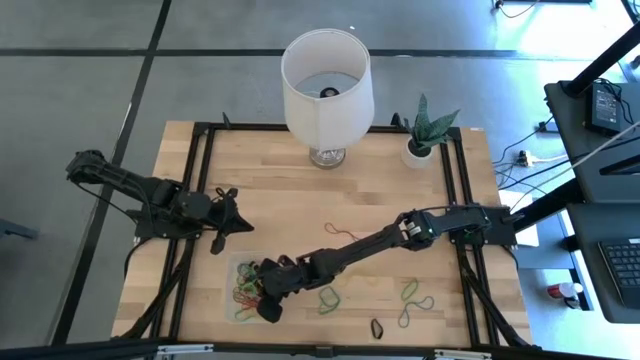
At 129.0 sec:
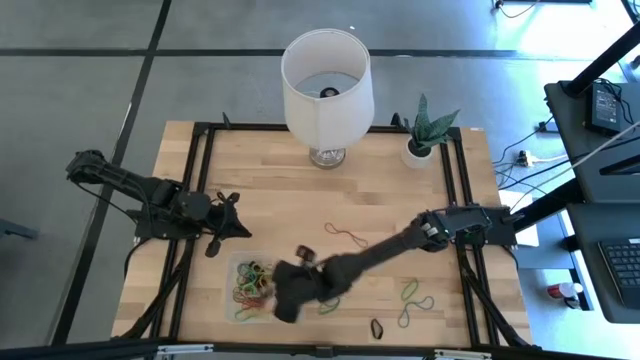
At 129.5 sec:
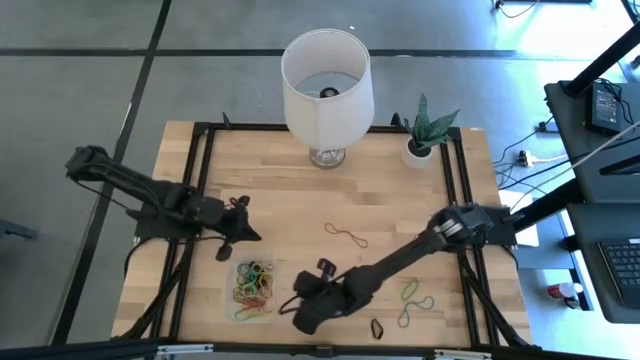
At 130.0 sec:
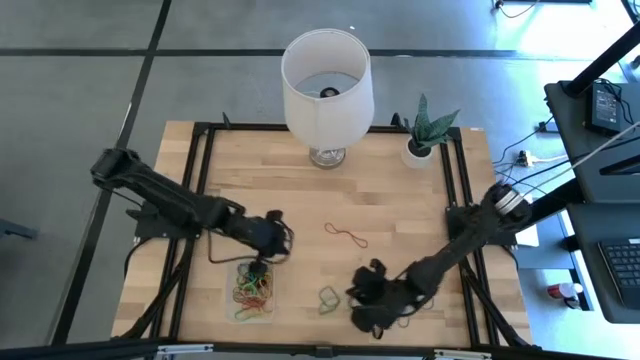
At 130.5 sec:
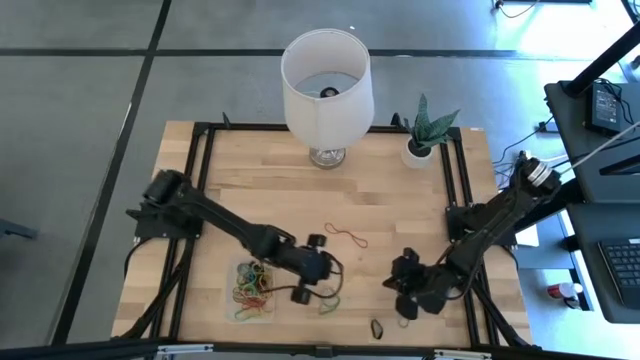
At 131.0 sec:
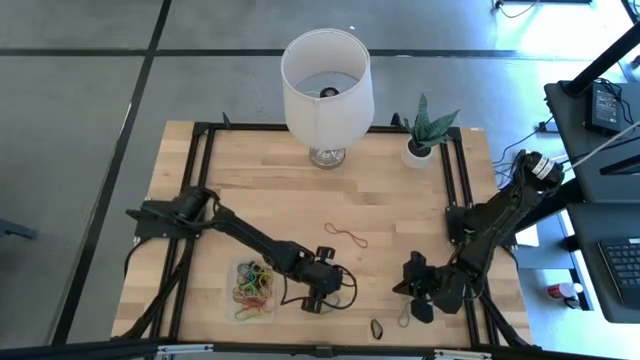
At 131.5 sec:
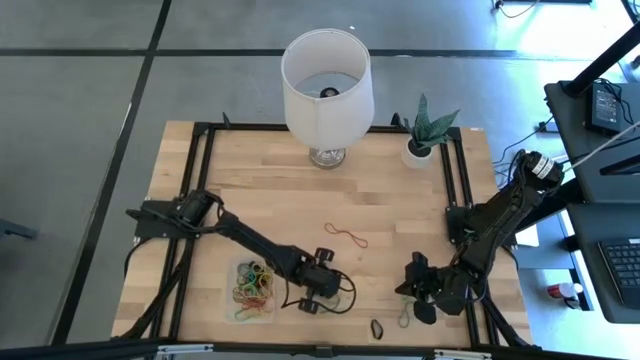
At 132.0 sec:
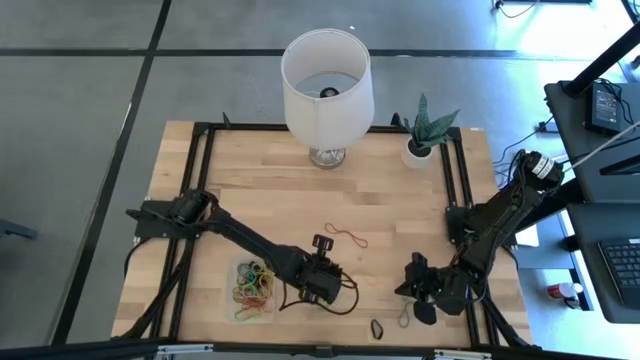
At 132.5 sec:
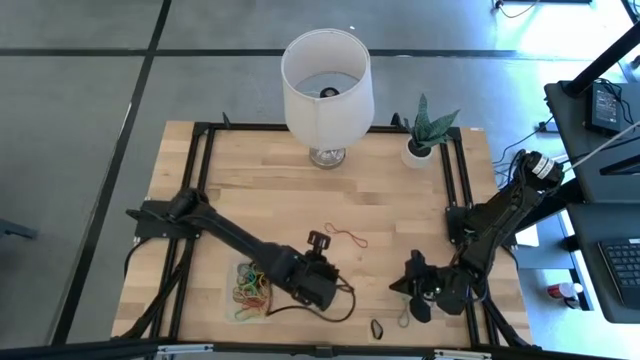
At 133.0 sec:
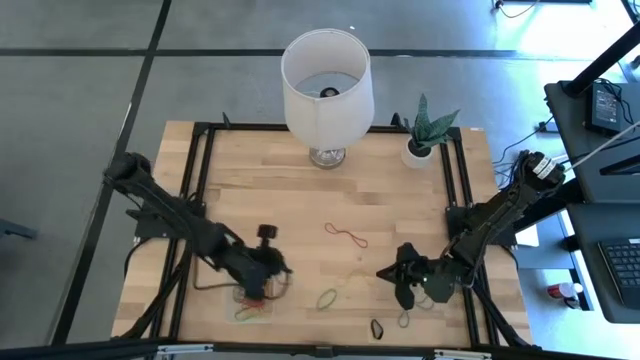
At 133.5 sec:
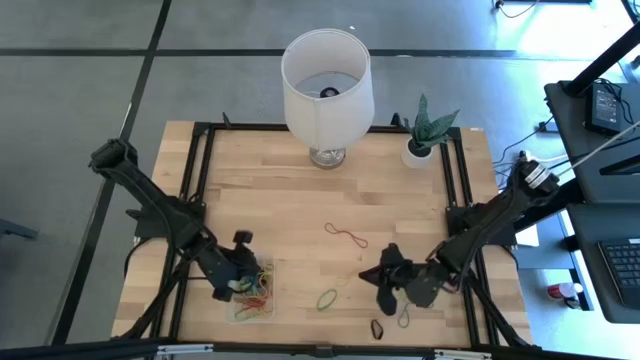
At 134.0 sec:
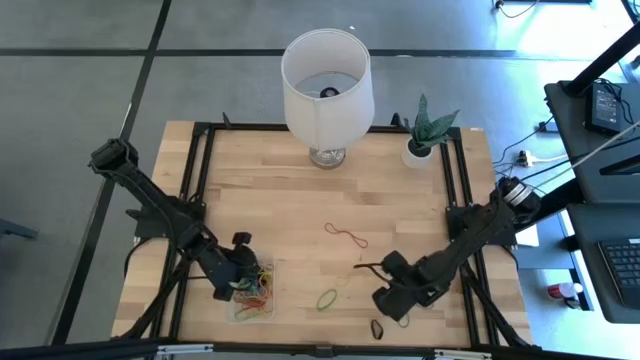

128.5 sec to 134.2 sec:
Task: Pick and place rubber bands into bin
Put the blue rubber band into the transparent bin

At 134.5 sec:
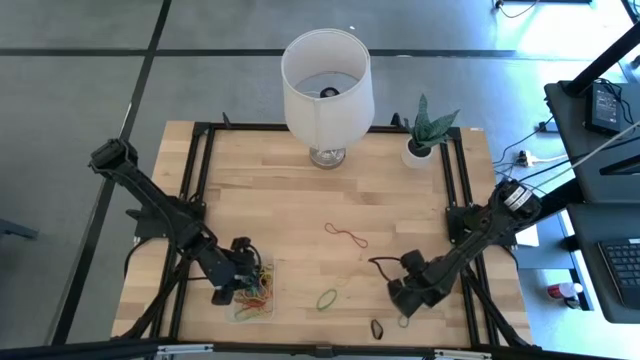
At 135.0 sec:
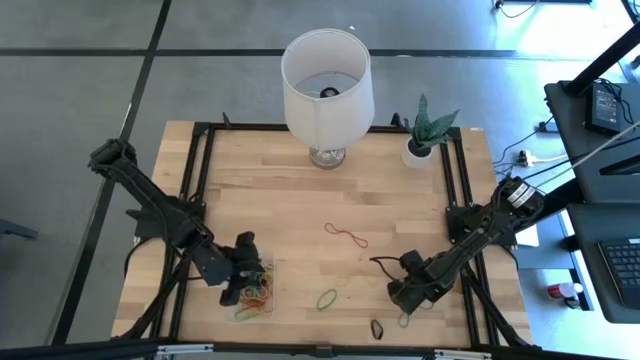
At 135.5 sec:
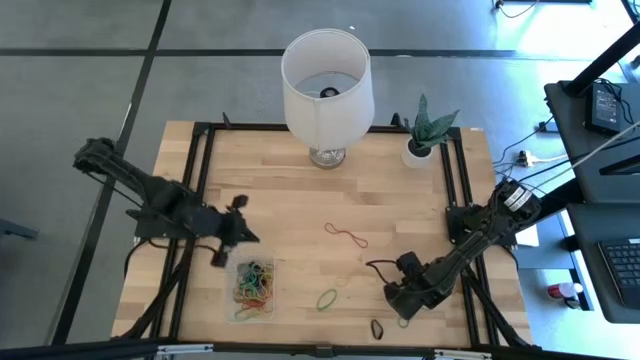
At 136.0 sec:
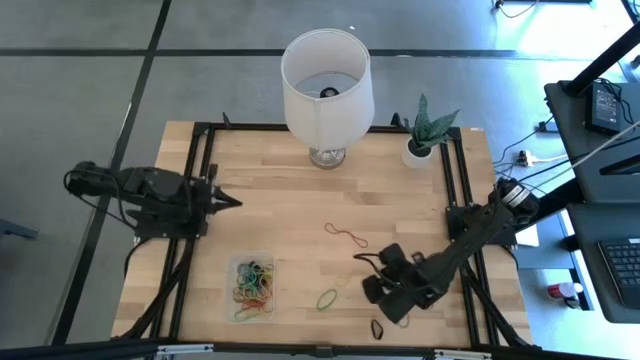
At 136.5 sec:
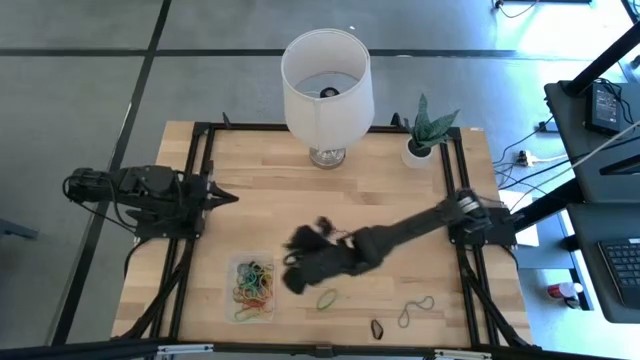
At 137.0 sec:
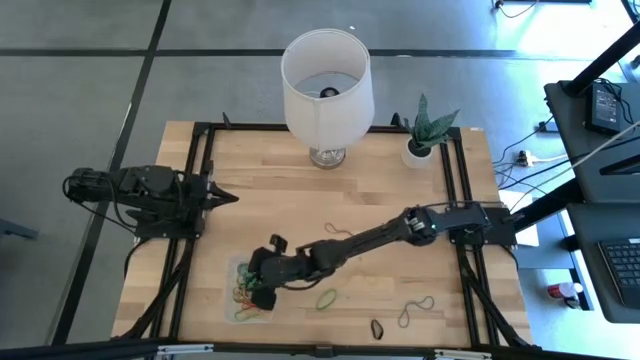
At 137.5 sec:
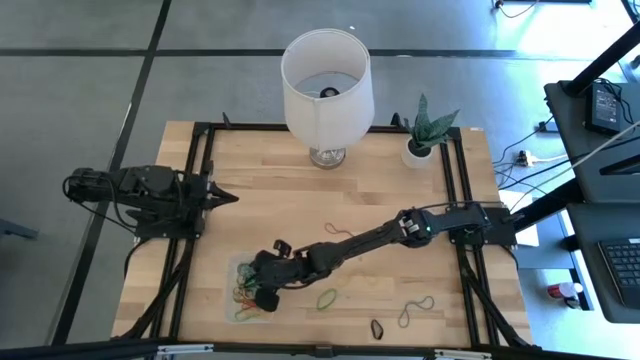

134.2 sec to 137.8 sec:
Put the green rubber band into the transparent bin

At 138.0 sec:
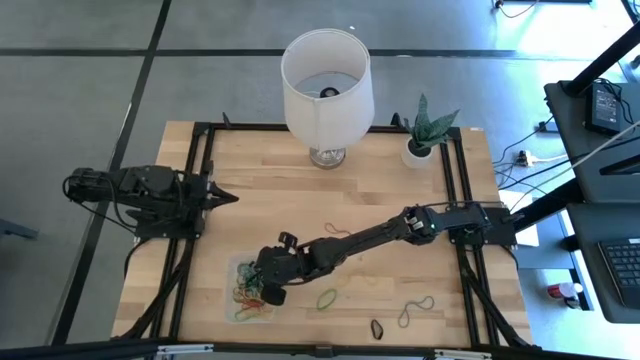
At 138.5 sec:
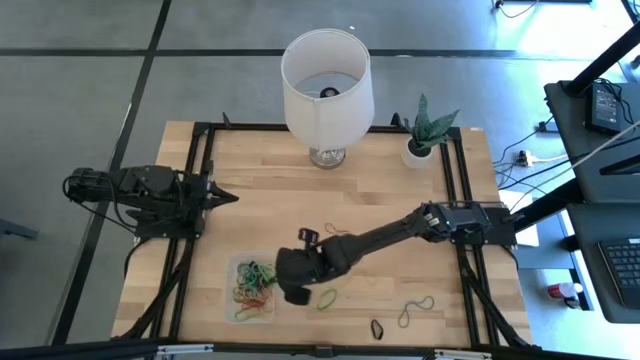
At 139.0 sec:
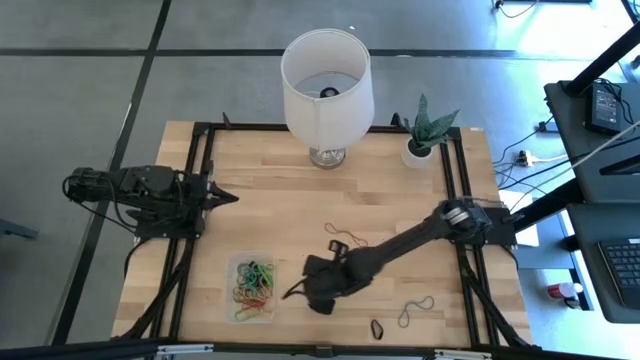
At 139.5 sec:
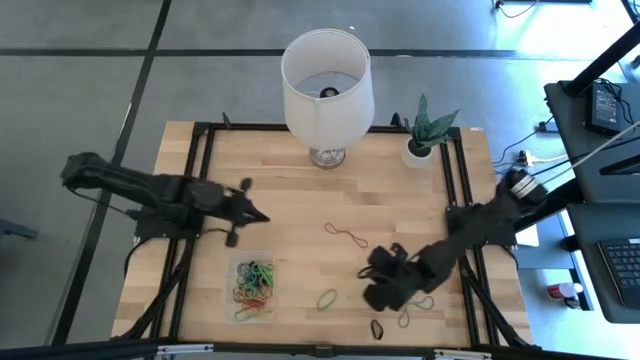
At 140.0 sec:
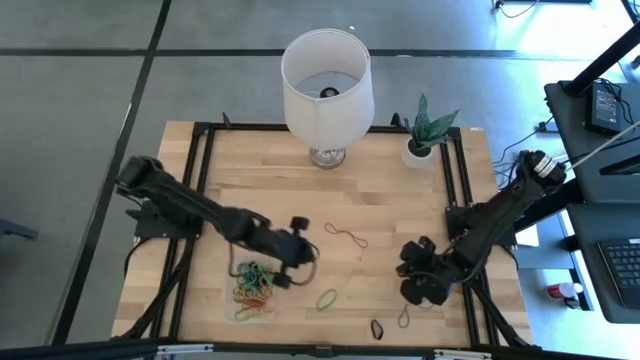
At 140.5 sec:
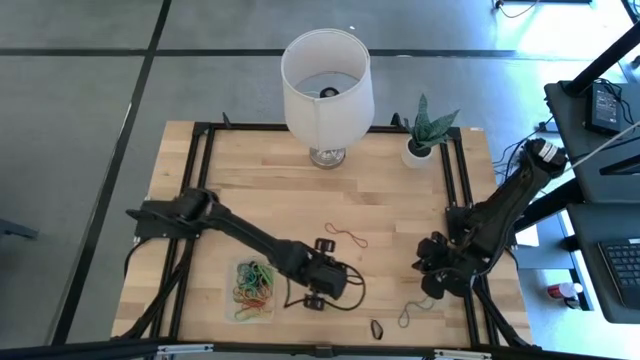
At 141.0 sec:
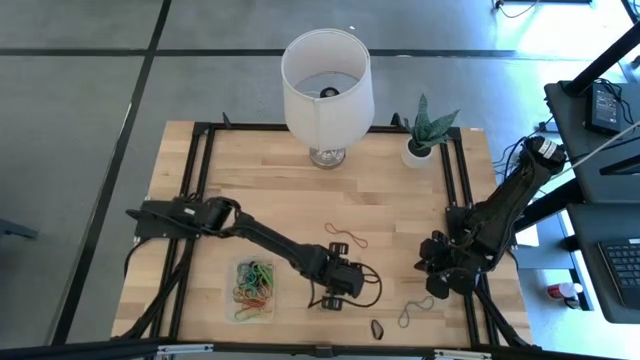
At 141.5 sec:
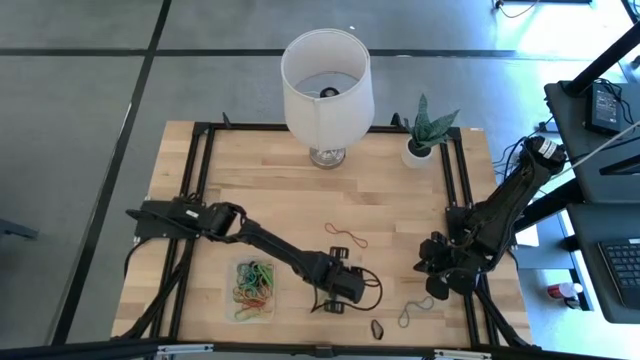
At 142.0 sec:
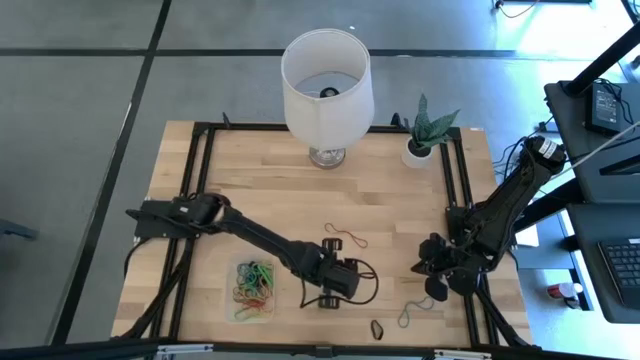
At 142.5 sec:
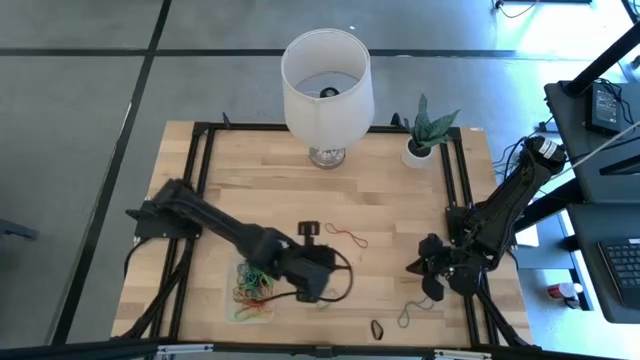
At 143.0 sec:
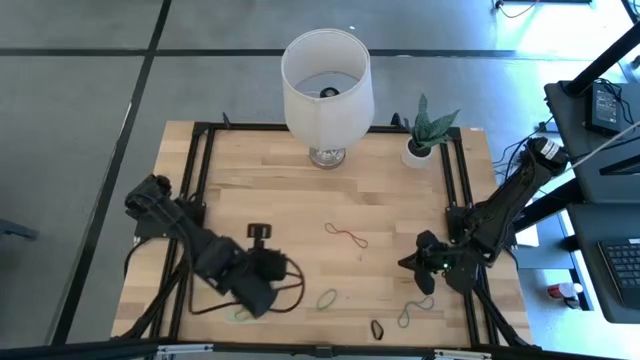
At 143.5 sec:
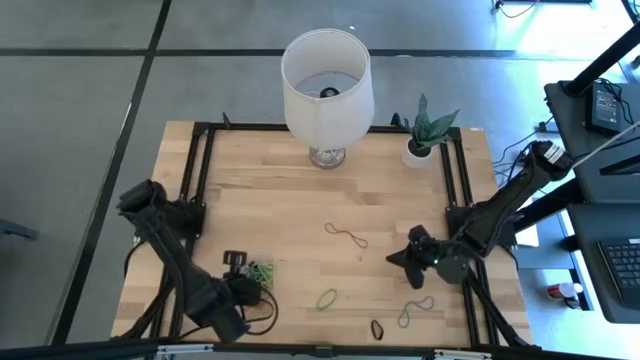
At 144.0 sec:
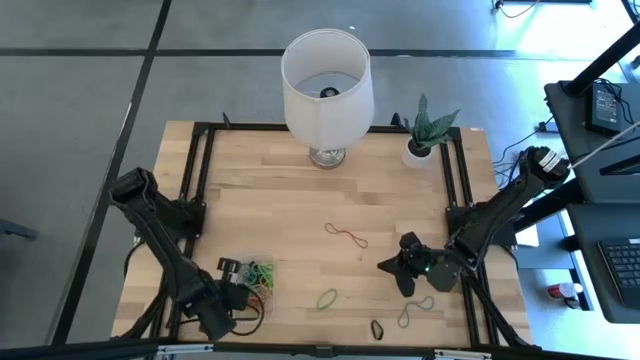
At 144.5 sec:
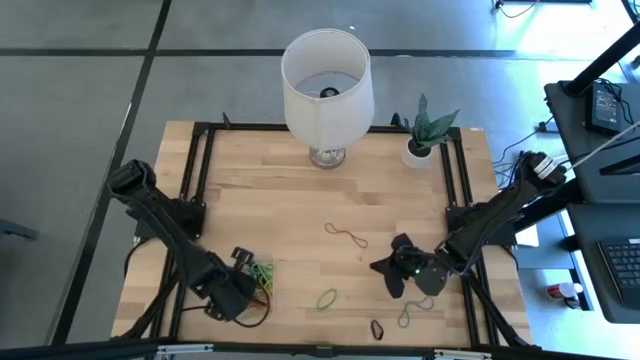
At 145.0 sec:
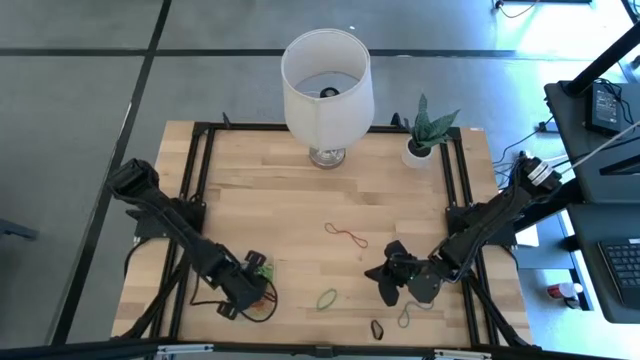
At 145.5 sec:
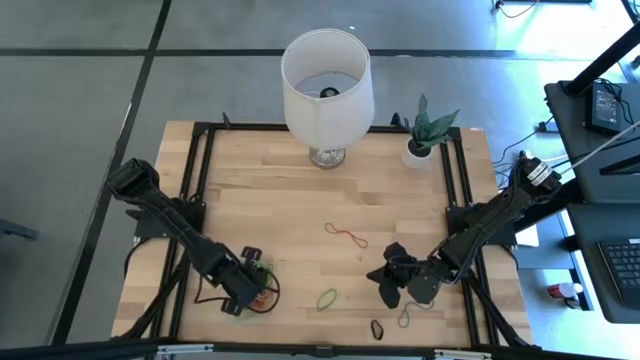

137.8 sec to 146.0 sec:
Put the yellow rubber band into the transparent bin

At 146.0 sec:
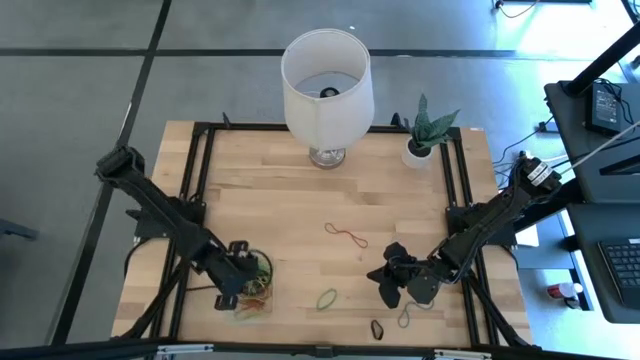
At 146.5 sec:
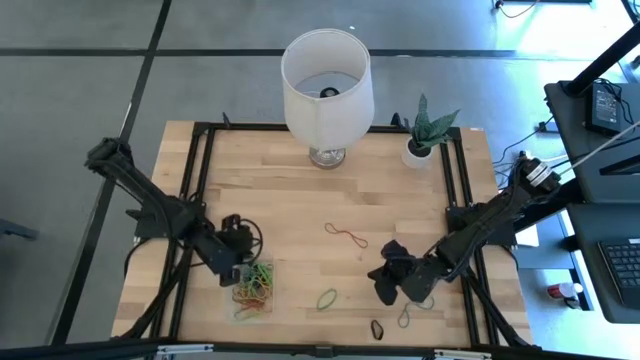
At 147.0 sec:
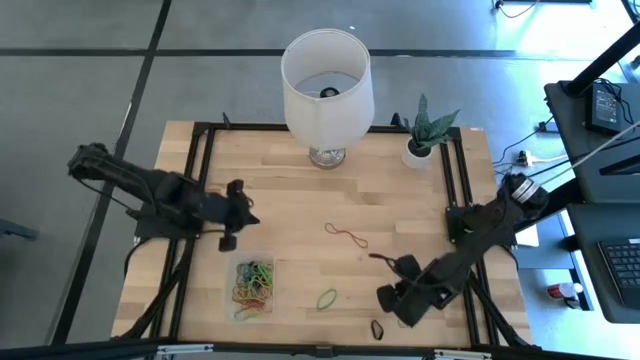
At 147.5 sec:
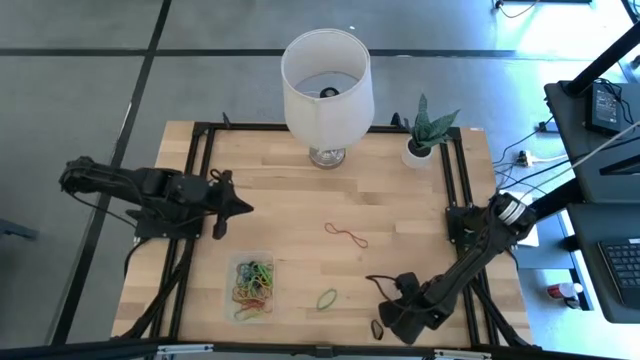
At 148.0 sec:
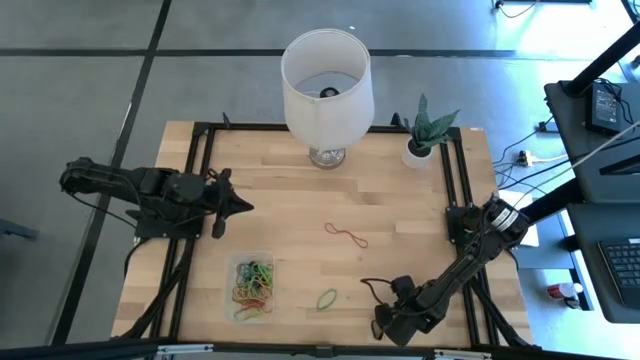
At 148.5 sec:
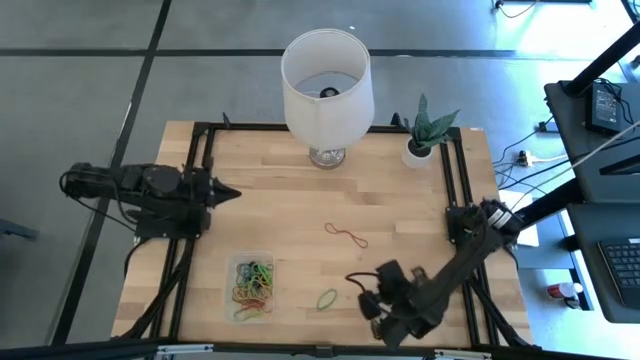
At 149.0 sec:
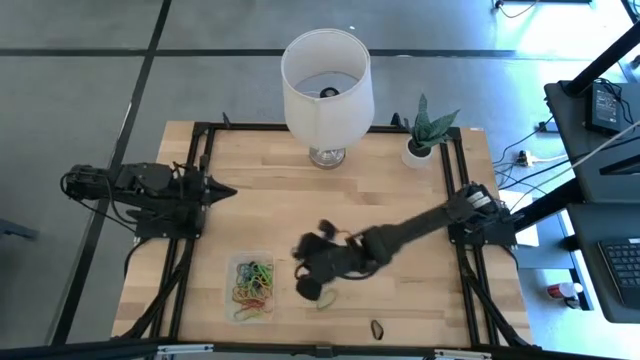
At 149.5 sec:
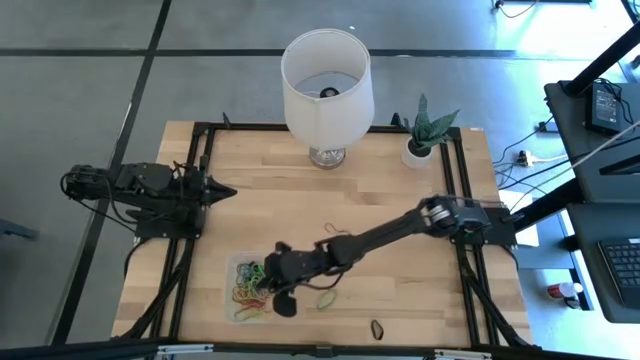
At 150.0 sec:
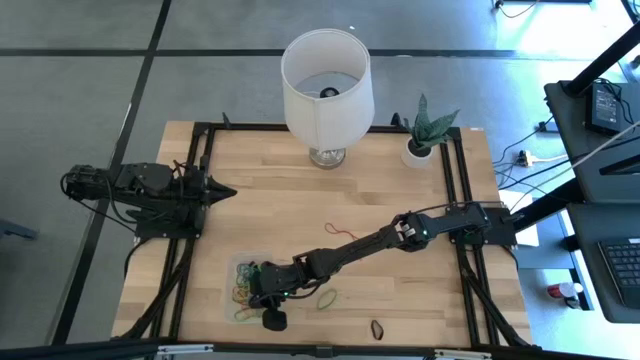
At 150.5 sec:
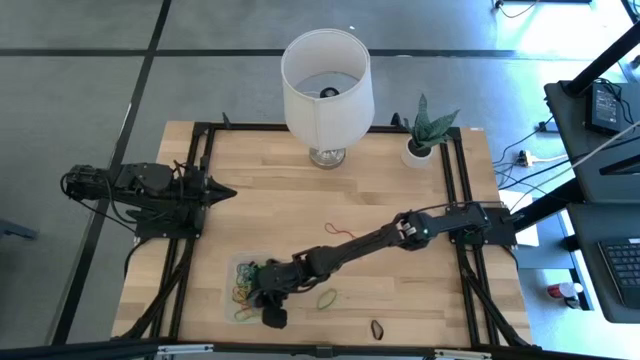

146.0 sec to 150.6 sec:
Put the large blue rubber band into the transparent bin
